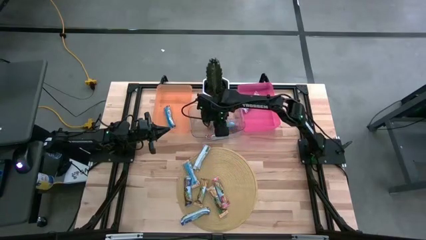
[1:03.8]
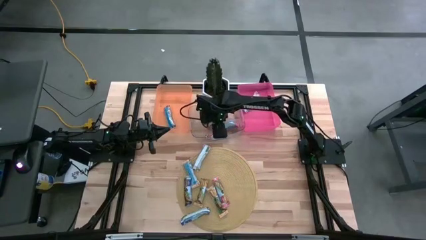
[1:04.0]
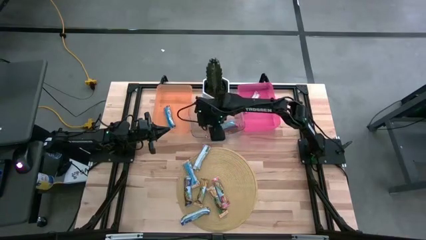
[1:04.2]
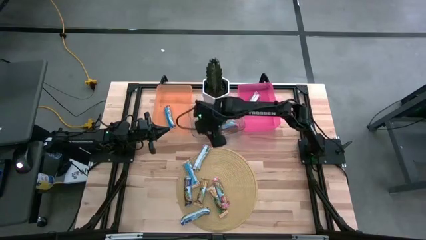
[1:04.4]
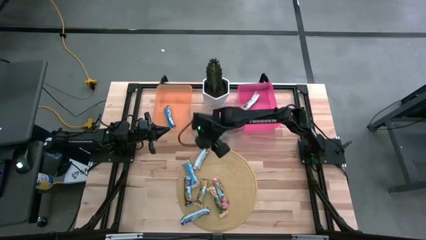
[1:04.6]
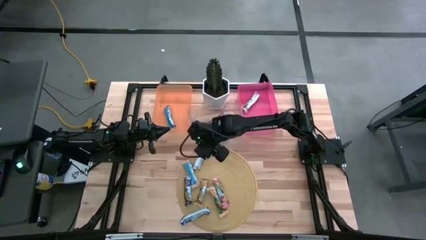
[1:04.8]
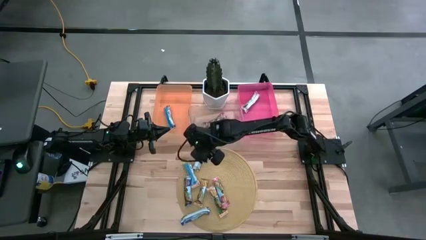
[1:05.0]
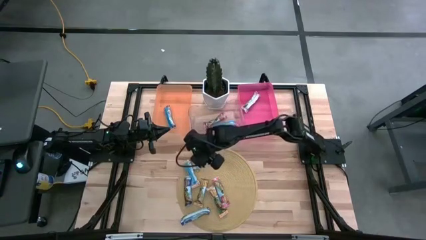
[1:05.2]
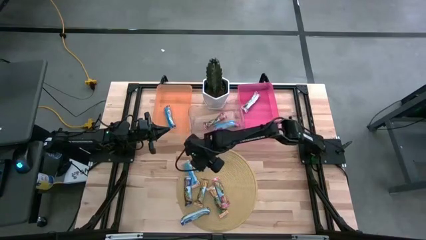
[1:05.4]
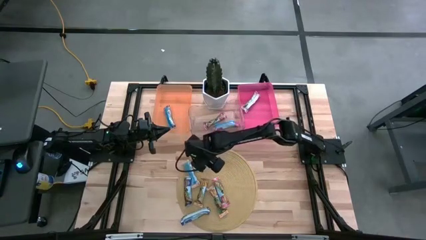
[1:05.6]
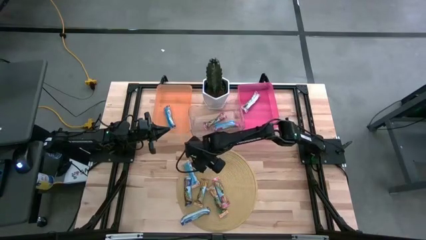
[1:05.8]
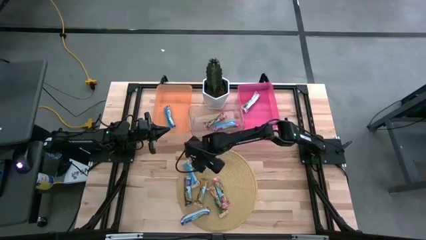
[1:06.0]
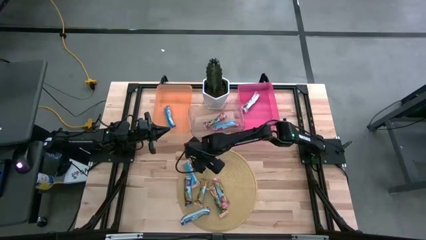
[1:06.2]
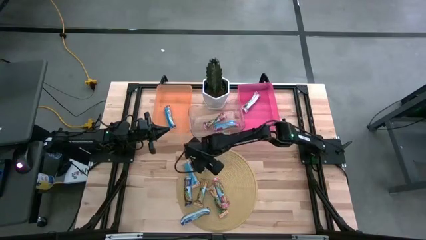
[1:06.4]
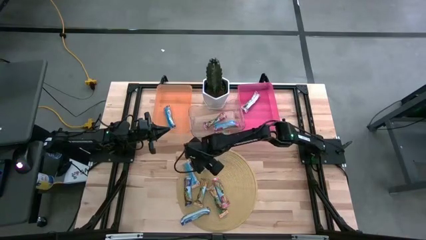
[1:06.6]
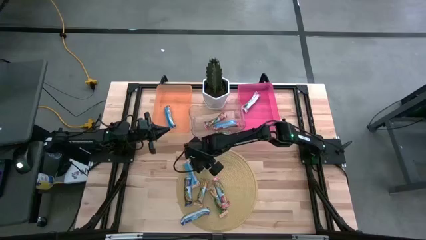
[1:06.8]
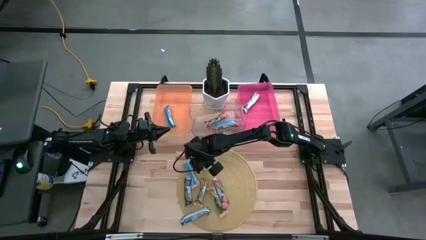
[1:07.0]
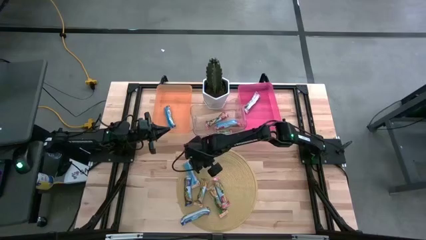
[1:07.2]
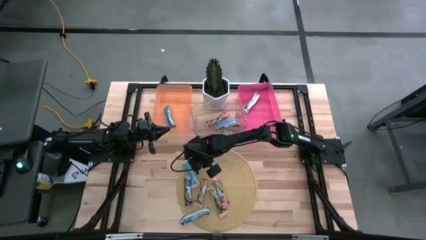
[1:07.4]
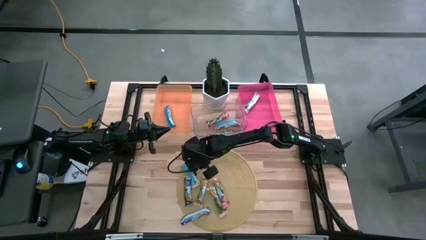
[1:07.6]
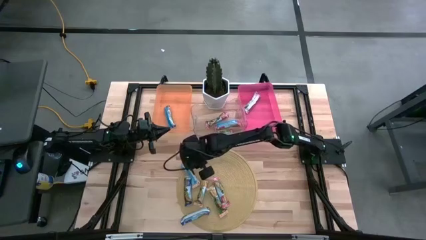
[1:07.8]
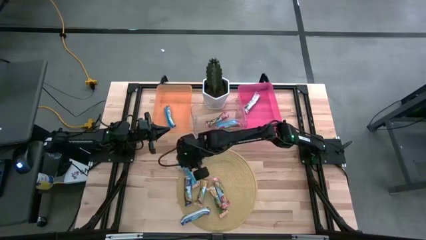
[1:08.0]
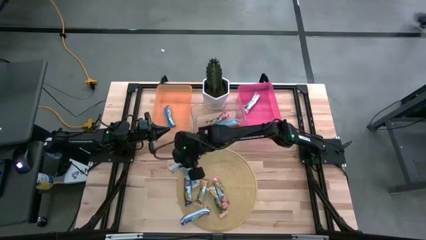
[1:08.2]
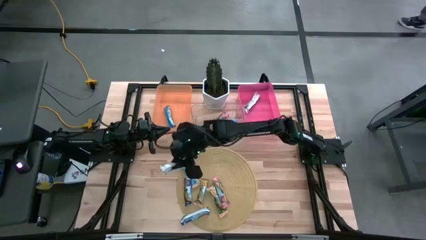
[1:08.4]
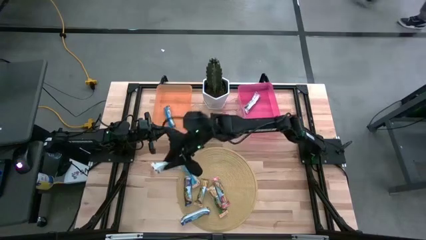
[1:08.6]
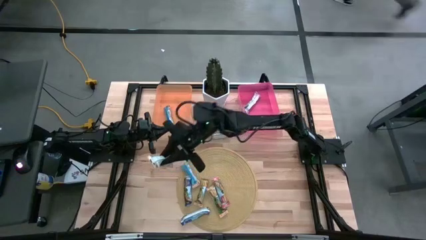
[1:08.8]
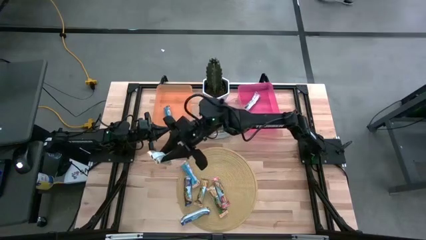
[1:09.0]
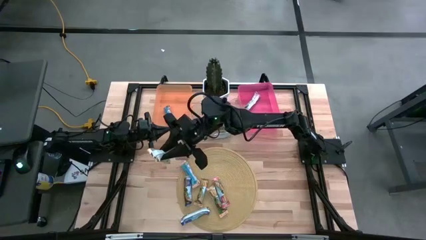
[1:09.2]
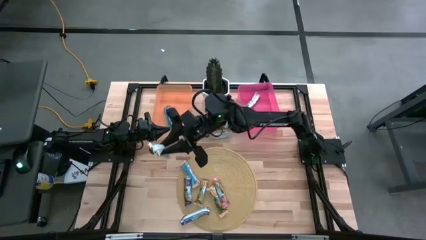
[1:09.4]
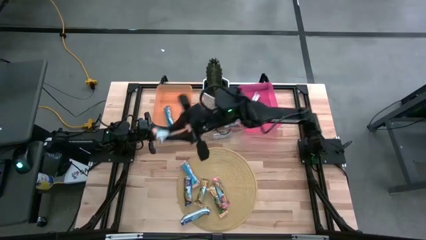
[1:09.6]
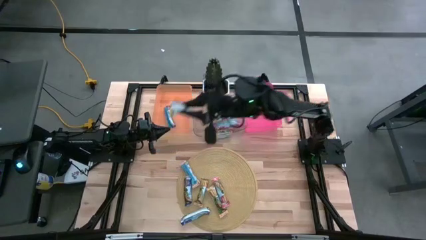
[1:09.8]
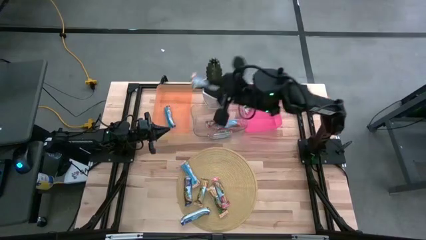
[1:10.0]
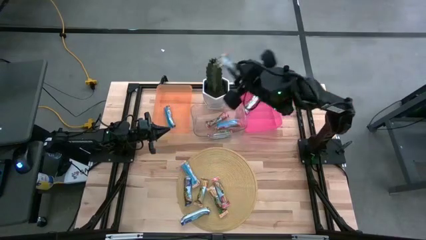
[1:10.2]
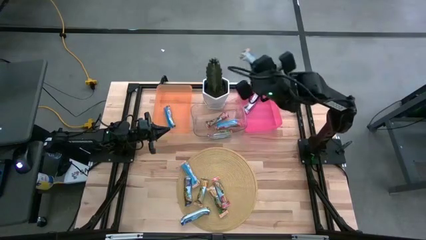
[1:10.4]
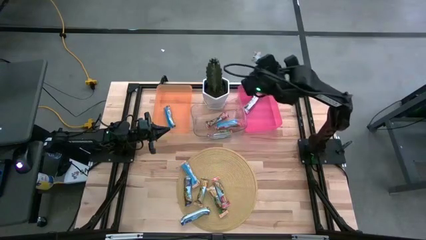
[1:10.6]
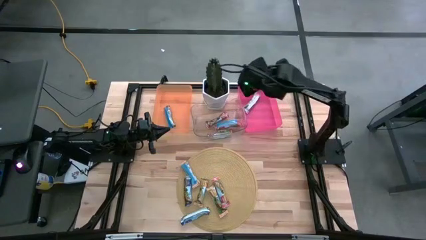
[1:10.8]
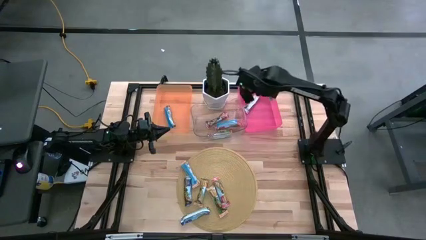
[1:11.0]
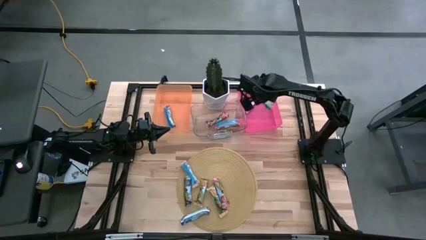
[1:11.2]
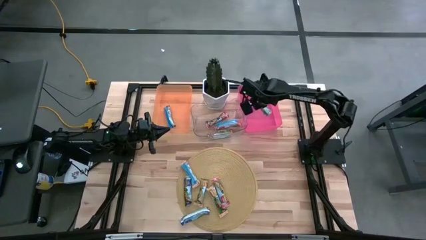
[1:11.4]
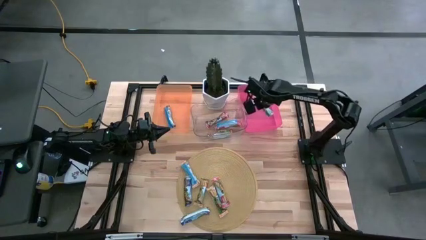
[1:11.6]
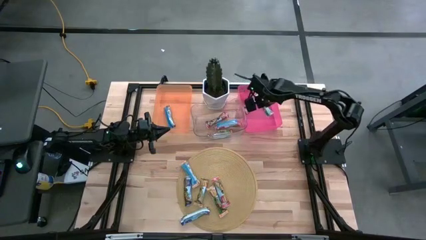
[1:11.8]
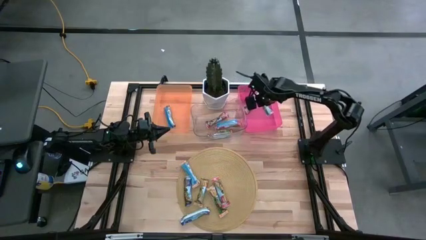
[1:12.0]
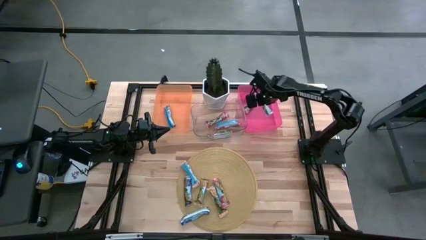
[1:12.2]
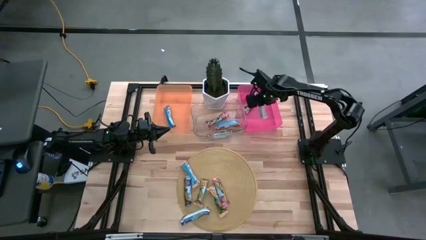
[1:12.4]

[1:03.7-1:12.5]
Task: Pick and place Granola Bars by type
Put the yellow granola bar into the red bin

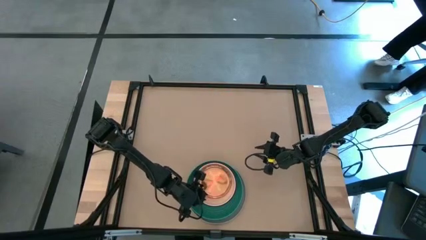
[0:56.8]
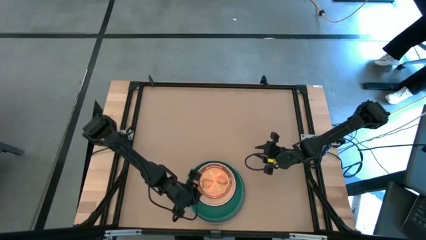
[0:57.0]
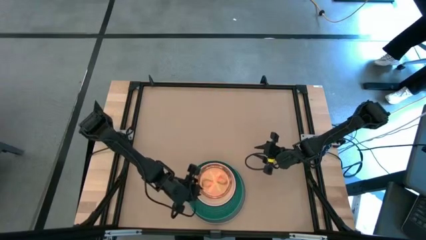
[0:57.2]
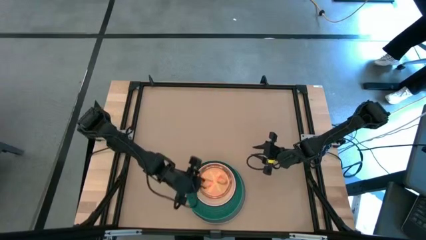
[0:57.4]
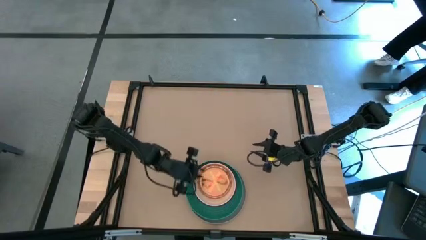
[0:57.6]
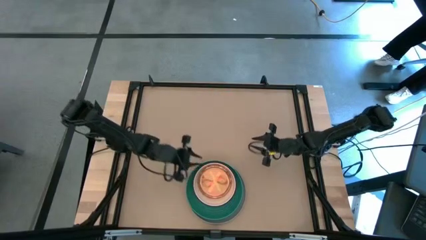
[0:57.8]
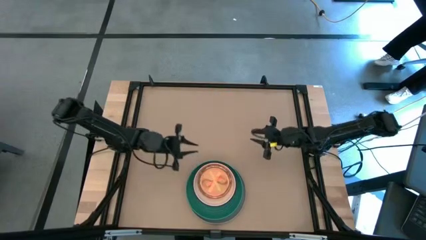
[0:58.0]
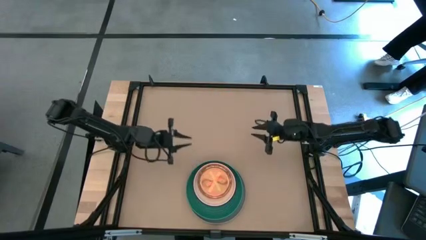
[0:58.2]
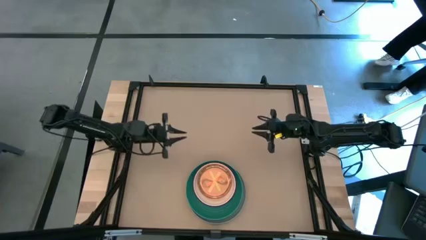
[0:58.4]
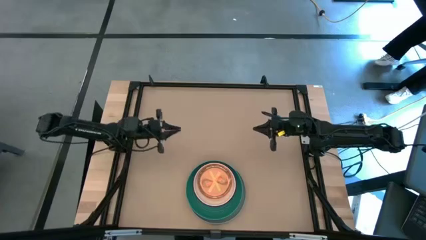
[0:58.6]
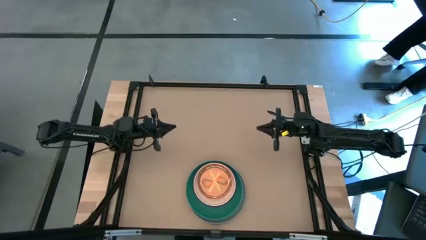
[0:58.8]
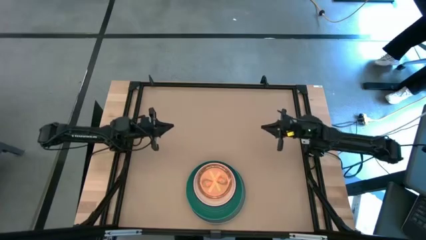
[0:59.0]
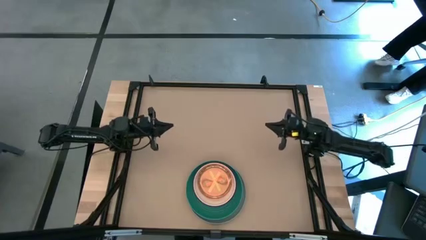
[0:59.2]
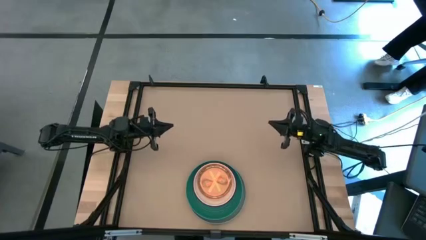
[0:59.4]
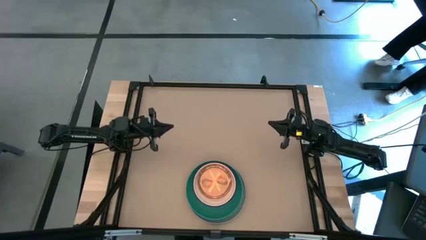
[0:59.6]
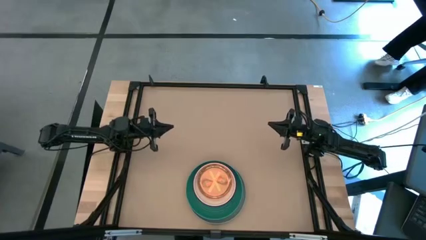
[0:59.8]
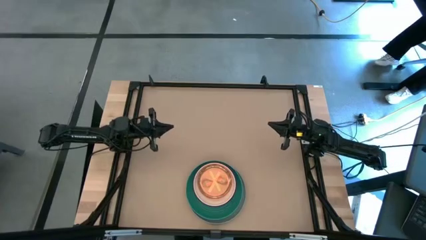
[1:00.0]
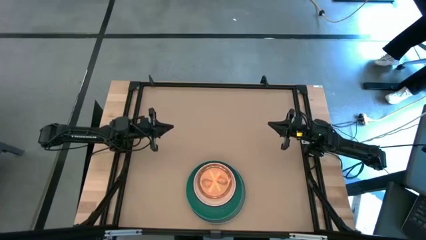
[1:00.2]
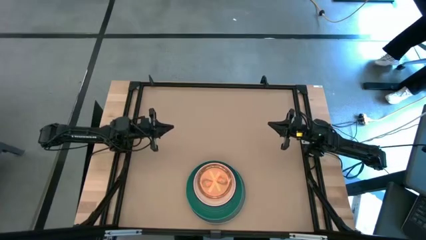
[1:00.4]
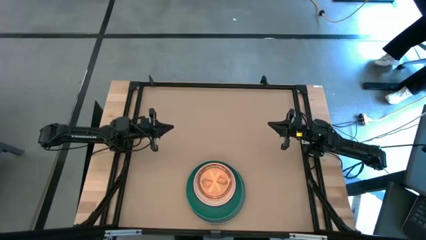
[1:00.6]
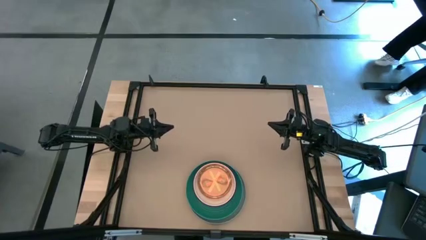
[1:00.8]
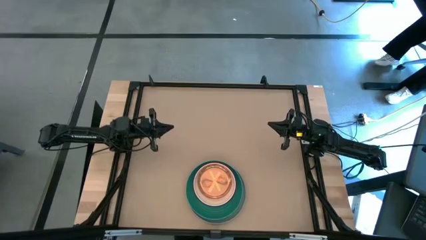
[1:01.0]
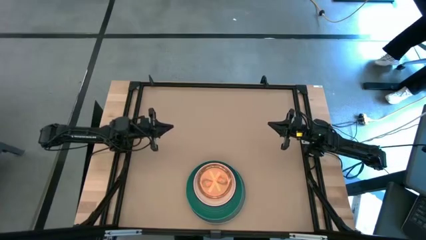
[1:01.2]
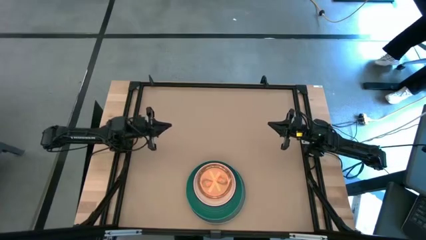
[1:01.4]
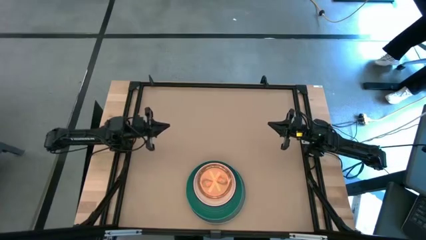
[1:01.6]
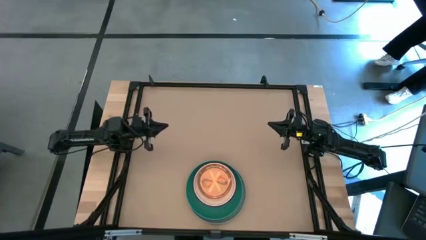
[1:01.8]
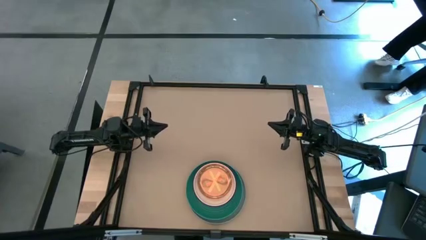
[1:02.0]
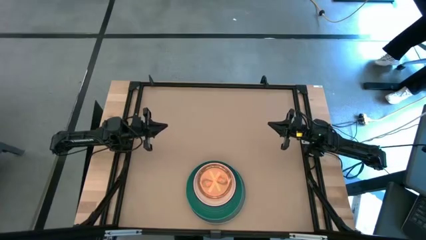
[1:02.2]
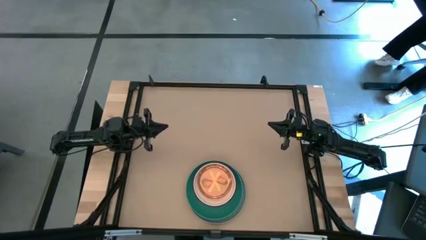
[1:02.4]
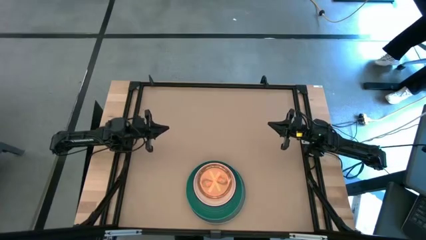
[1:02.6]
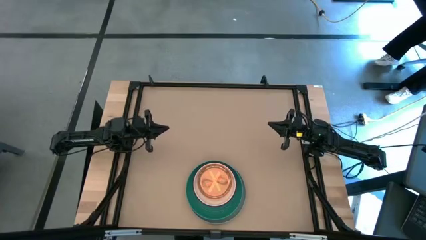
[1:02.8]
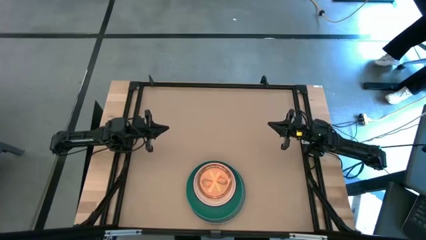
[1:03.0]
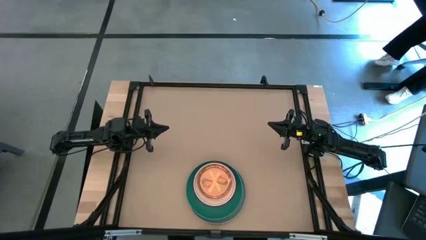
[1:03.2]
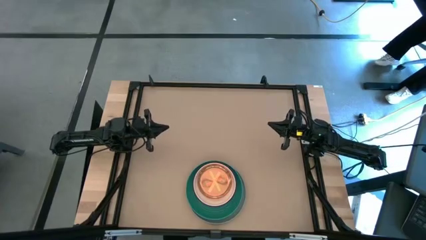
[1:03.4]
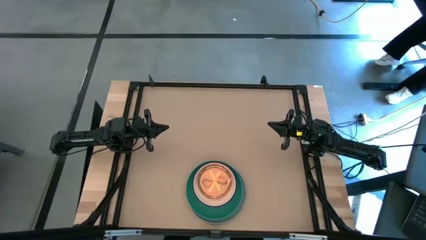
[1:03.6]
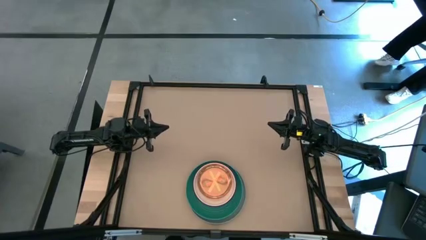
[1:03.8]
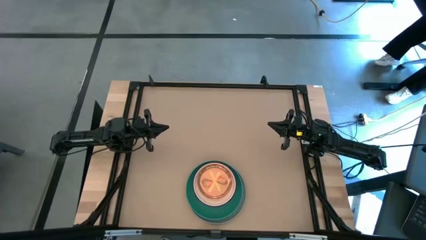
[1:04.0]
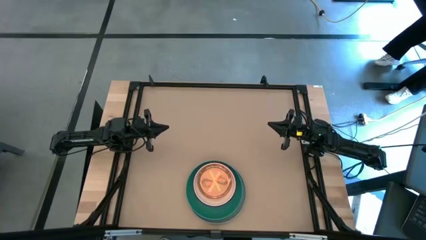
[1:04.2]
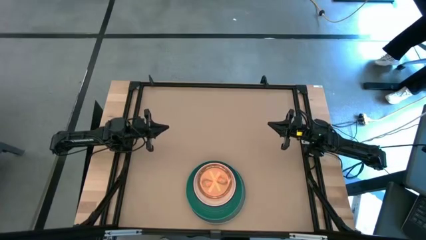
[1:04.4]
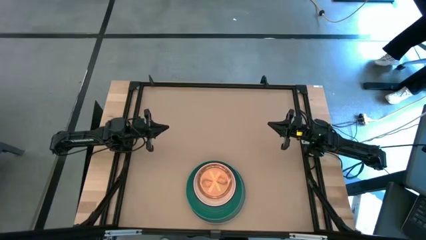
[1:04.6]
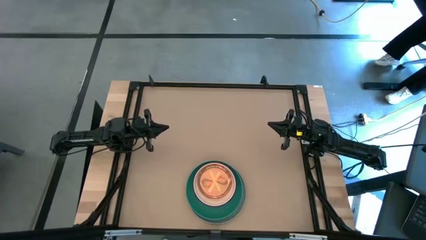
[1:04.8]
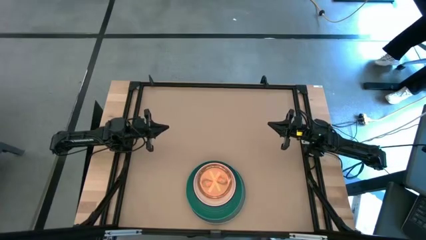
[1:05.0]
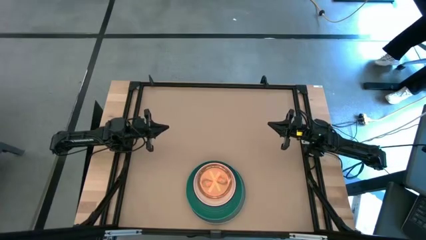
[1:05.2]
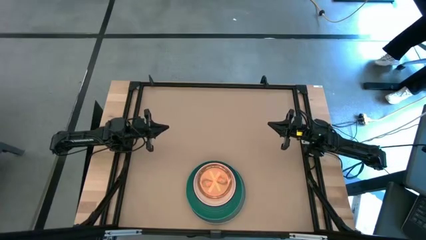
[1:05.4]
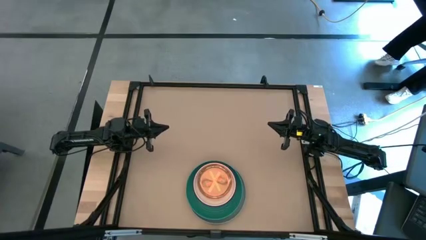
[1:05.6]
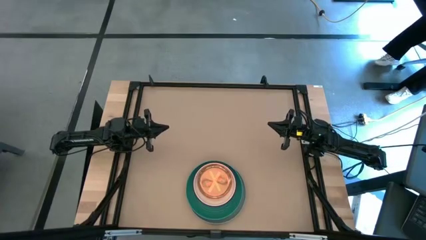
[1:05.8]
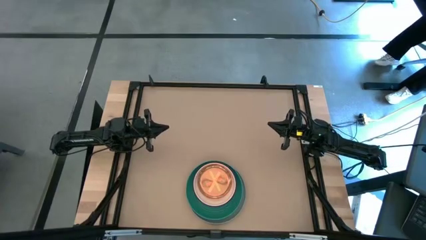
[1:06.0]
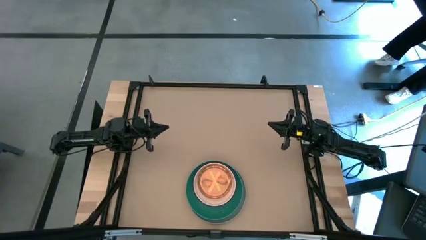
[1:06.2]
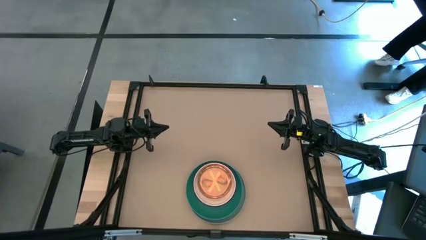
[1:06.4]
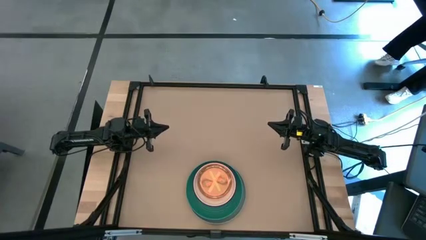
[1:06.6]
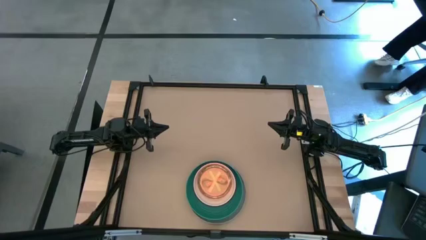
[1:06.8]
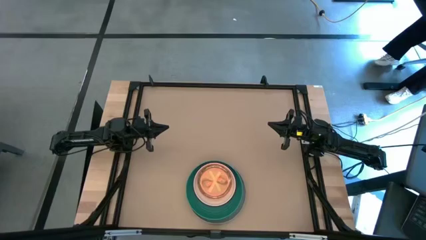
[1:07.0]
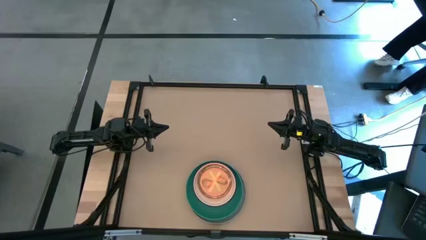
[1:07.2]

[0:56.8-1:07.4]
Task: Stack plastic plates
Return to Home Position
